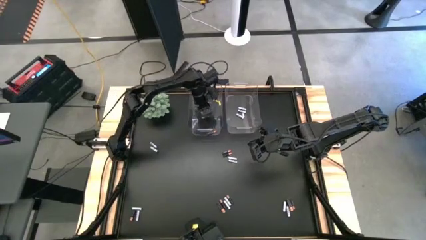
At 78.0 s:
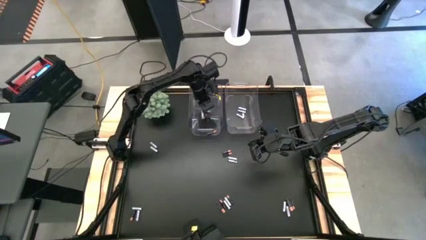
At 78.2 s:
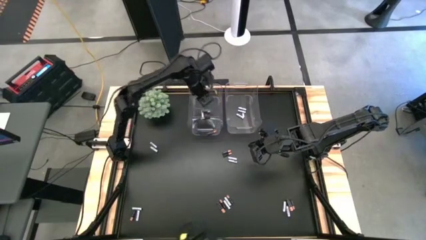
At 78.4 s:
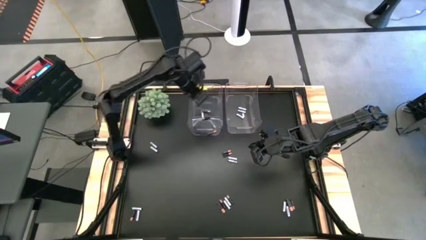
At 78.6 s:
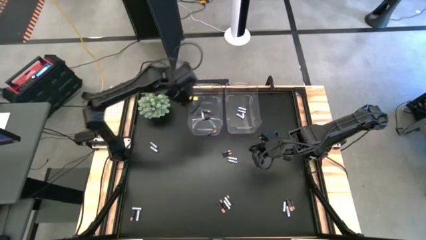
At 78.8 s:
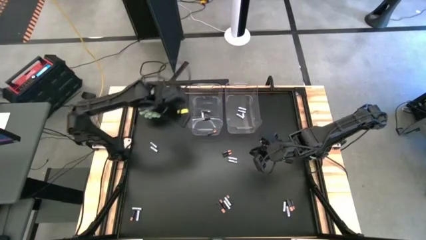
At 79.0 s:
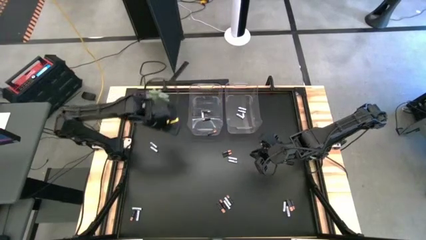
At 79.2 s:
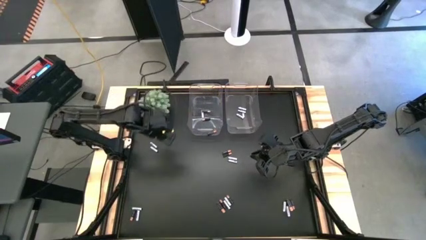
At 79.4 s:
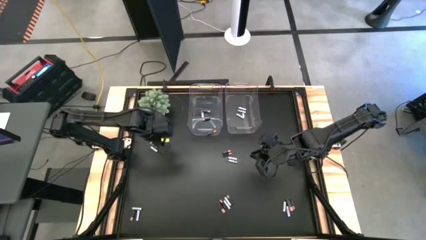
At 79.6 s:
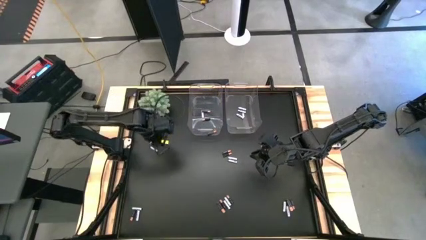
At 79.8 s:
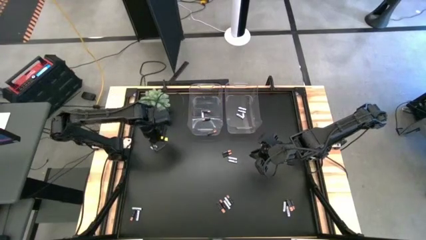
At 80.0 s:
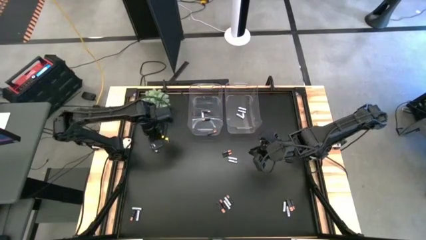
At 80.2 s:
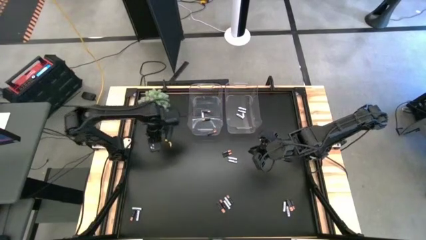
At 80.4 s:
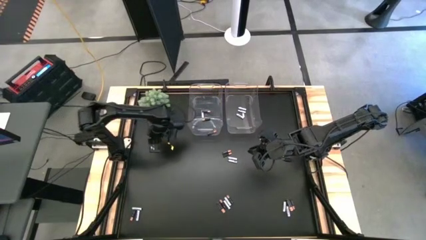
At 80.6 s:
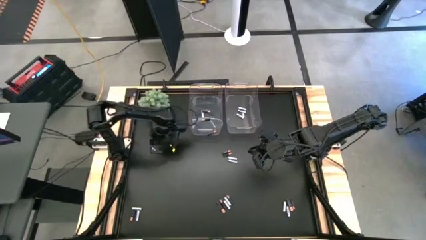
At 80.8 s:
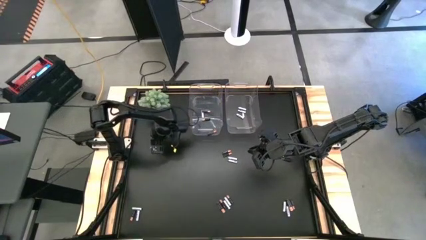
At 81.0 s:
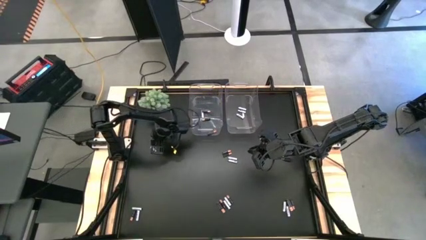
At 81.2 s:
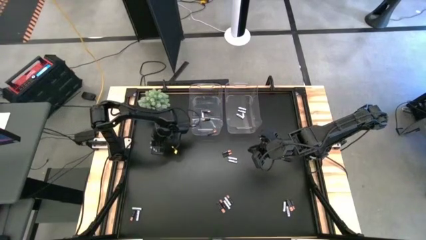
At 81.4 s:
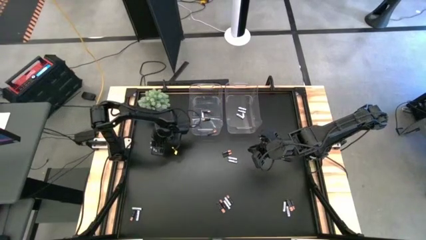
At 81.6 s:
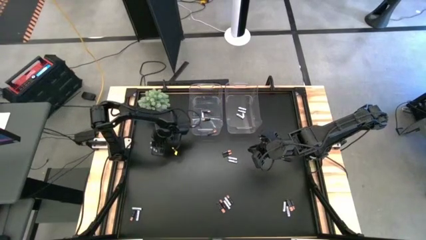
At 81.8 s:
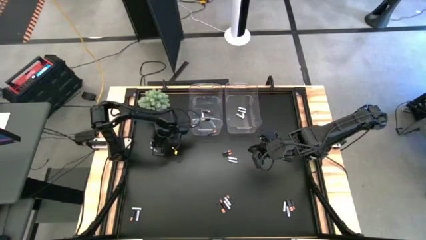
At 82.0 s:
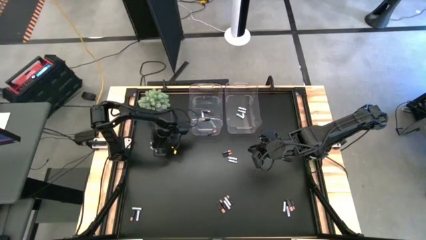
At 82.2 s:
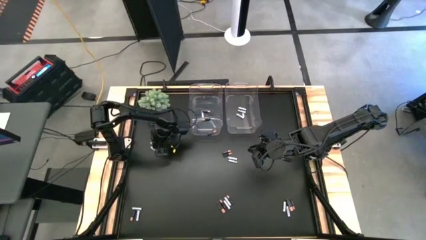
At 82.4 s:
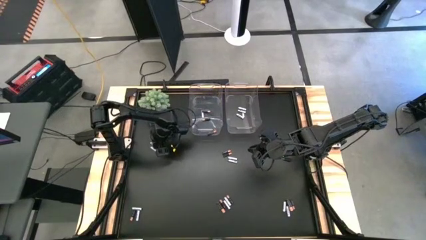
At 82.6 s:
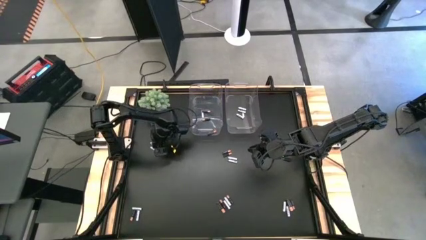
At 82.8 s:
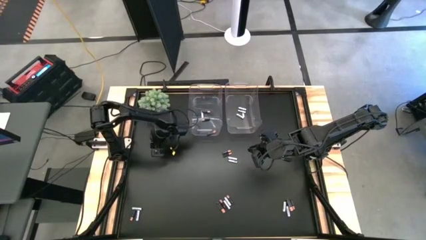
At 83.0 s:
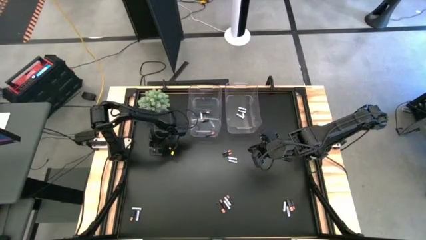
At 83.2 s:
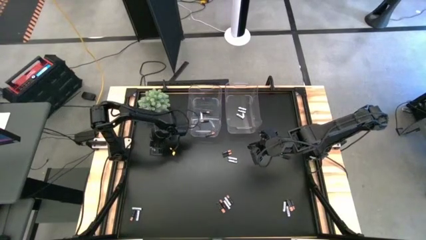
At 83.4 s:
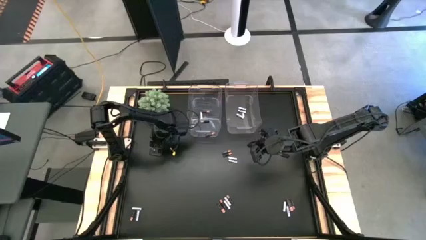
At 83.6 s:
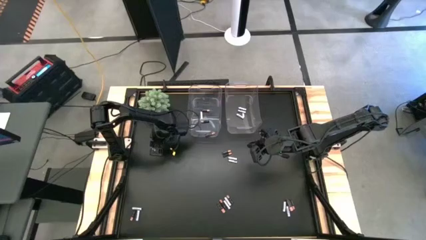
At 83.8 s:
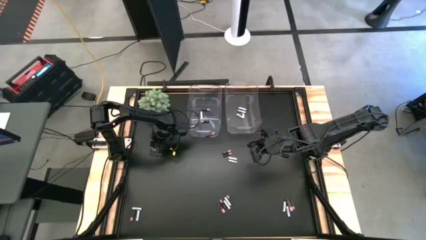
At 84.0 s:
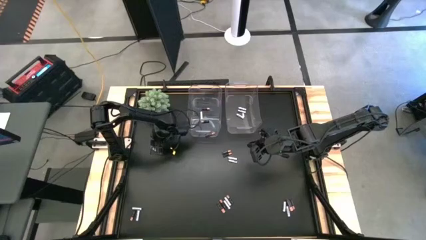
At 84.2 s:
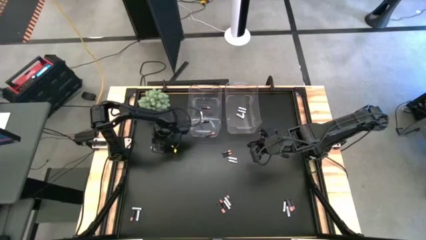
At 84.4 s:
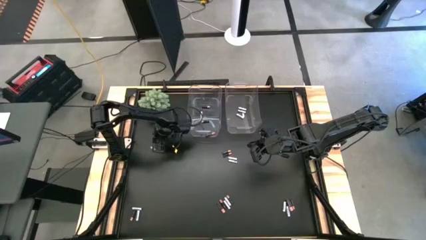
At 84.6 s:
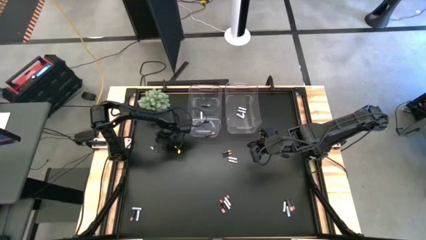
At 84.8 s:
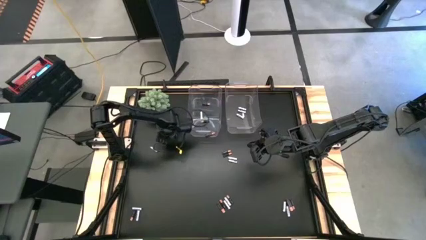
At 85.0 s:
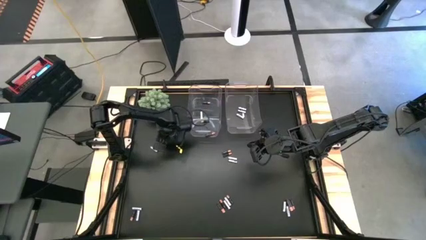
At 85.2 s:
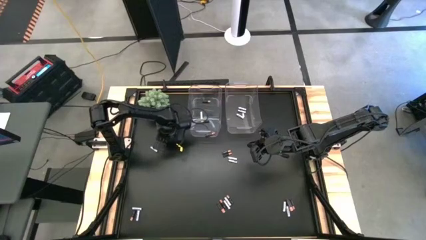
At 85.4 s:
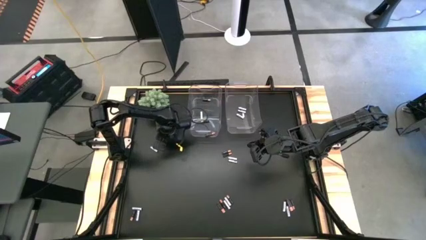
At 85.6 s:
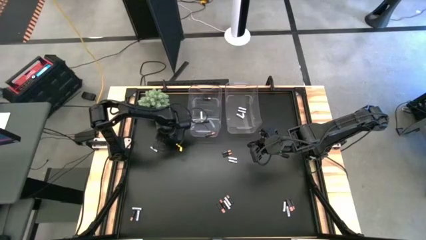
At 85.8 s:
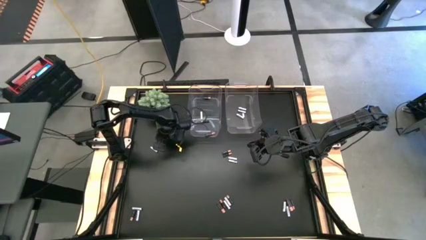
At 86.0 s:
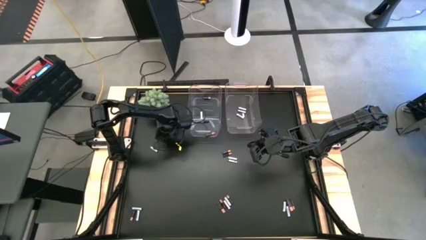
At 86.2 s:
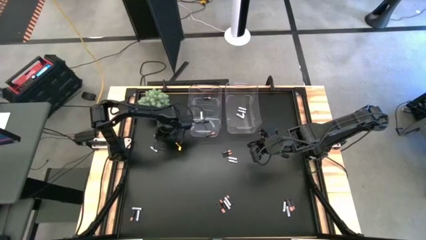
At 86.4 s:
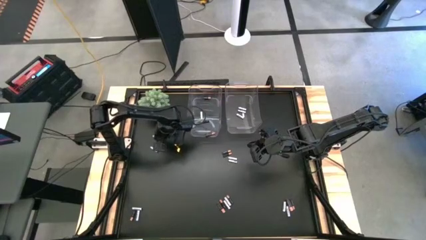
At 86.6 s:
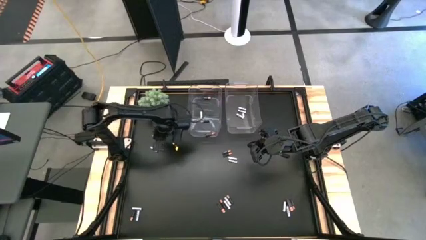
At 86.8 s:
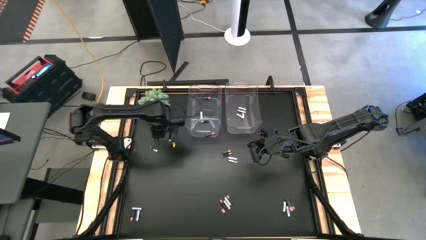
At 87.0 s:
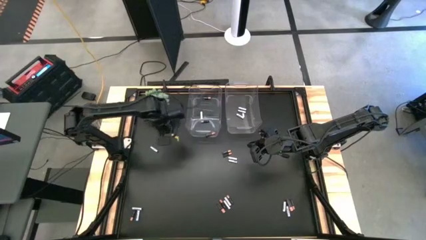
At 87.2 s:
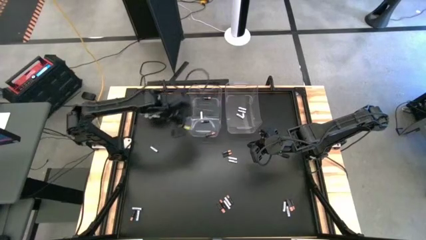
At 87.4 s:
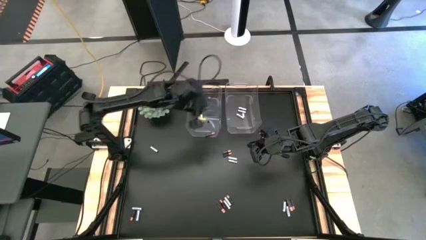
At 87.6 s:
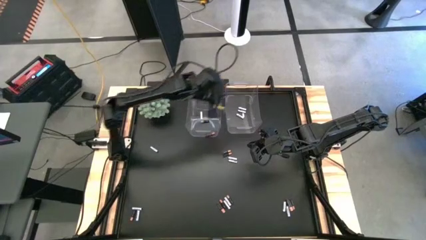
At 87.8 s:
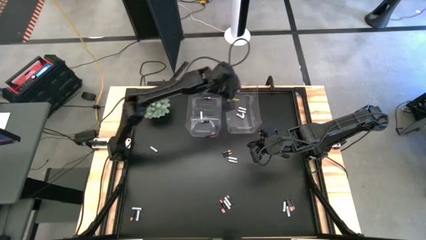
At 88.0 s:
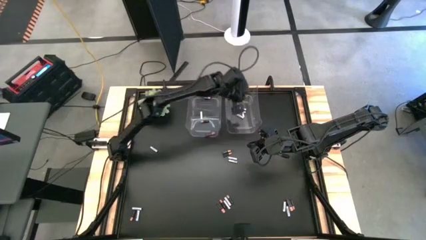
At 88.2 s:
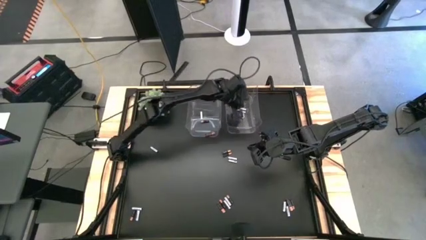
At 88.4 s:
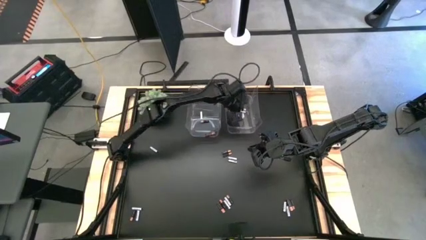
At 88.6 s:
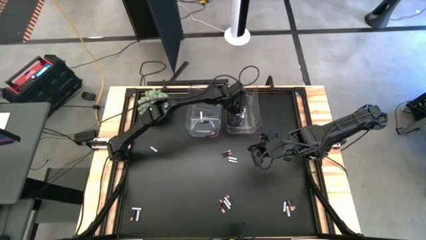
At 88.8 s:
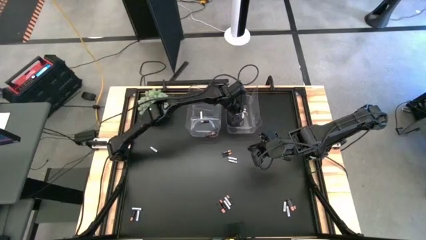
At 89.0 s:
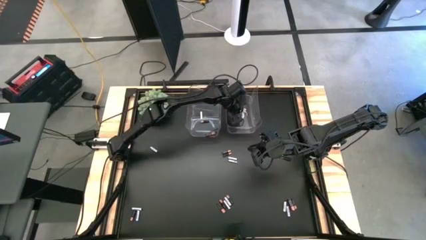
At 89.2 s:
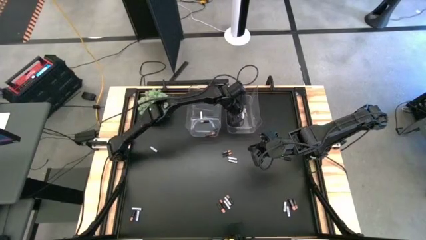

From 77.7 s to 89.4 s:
Task: Sort batteries
Put the white battery into the right transparent bin

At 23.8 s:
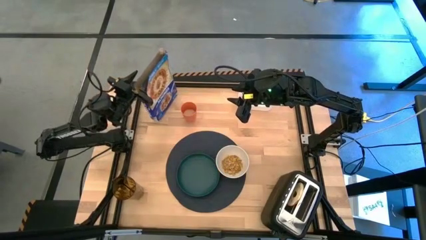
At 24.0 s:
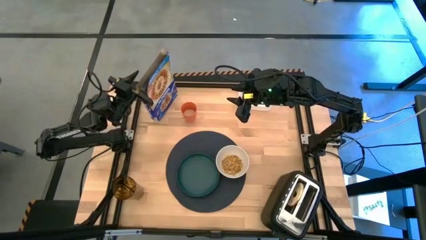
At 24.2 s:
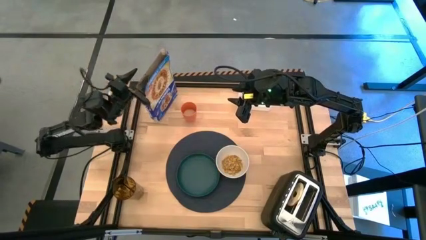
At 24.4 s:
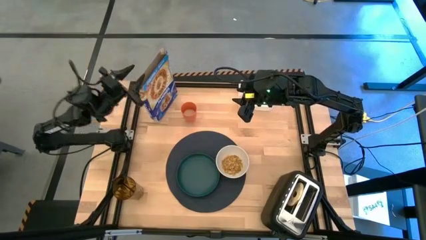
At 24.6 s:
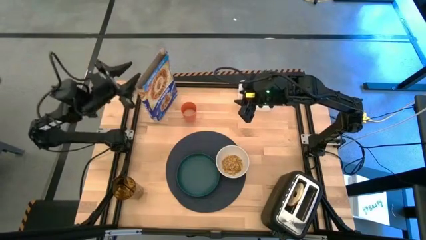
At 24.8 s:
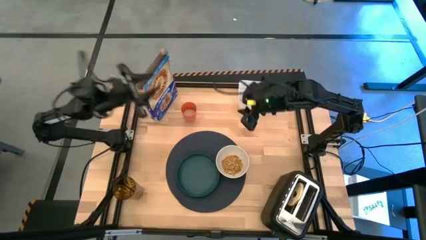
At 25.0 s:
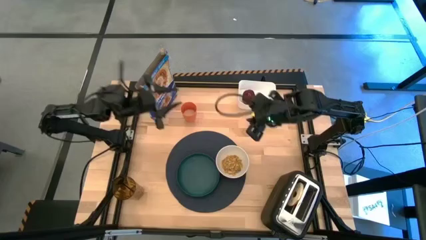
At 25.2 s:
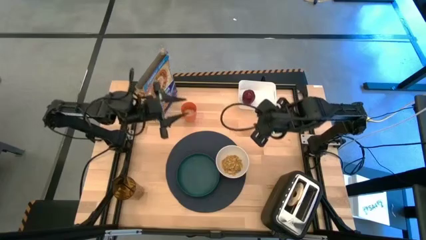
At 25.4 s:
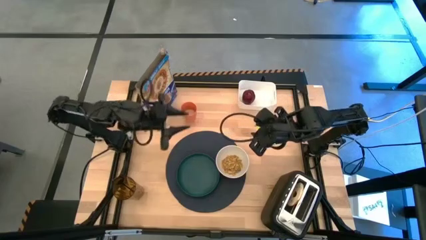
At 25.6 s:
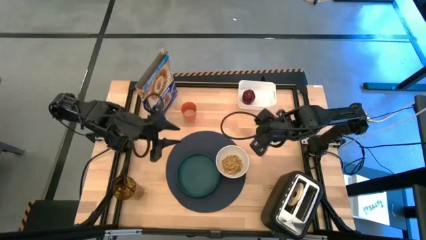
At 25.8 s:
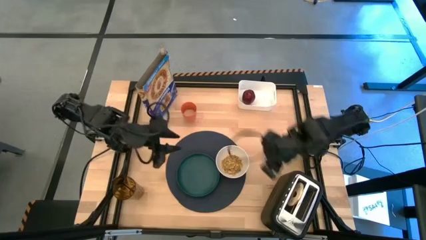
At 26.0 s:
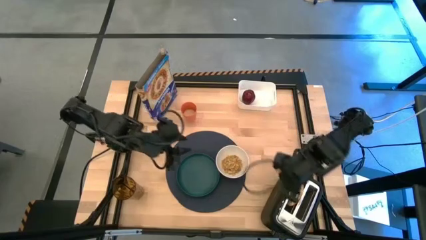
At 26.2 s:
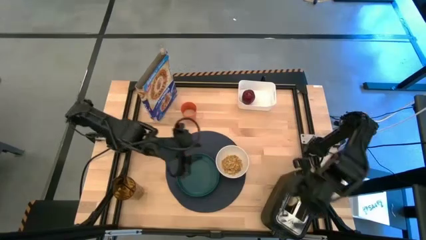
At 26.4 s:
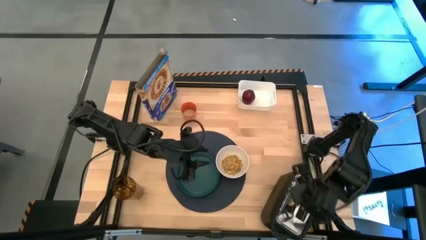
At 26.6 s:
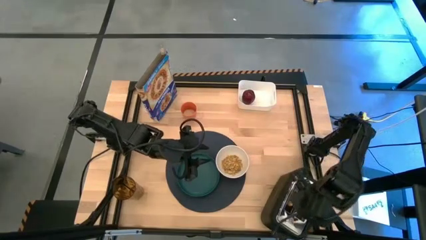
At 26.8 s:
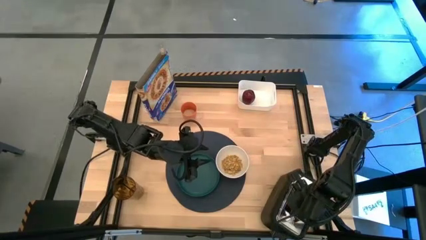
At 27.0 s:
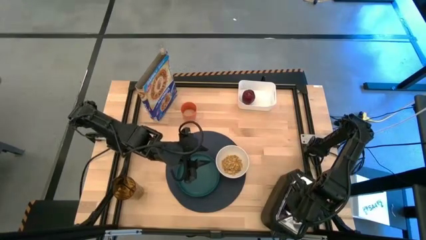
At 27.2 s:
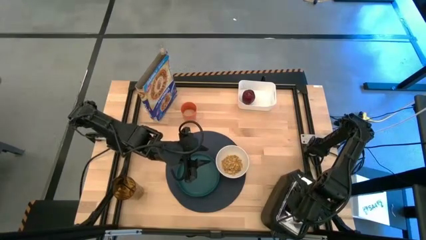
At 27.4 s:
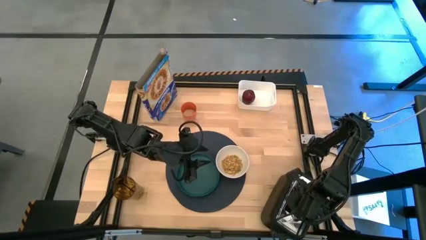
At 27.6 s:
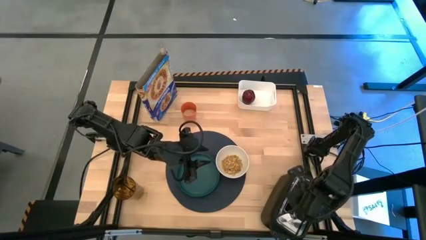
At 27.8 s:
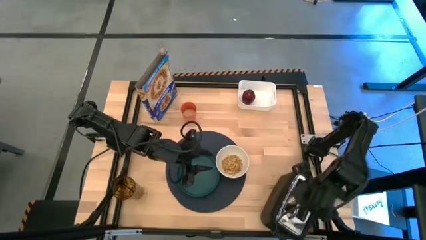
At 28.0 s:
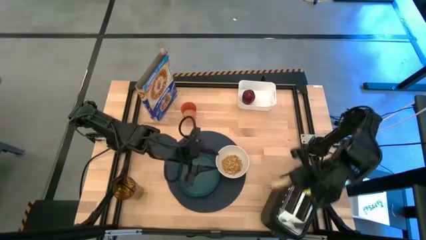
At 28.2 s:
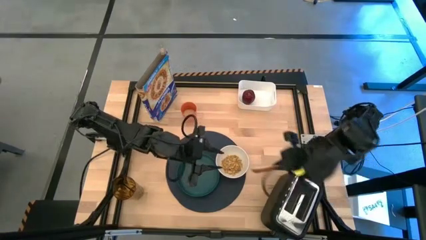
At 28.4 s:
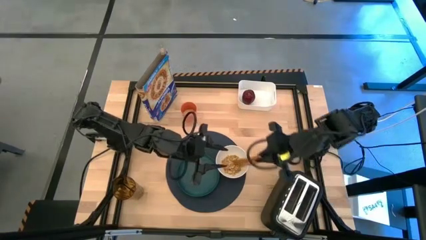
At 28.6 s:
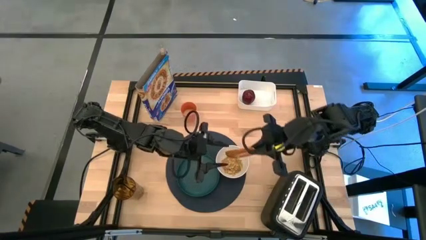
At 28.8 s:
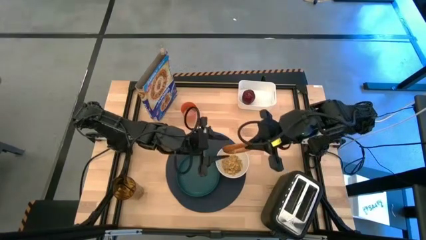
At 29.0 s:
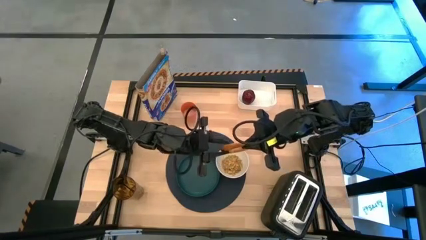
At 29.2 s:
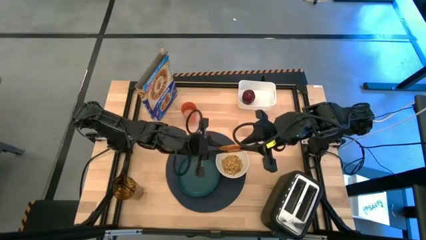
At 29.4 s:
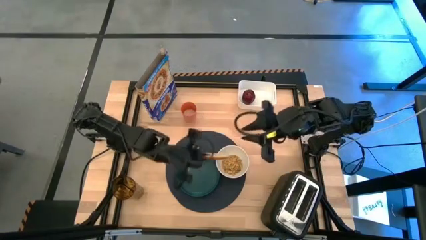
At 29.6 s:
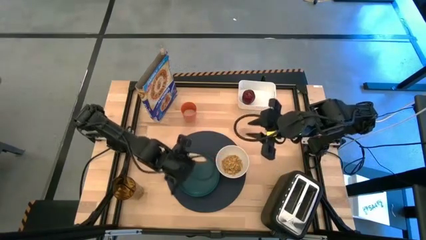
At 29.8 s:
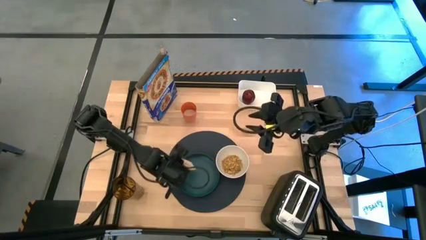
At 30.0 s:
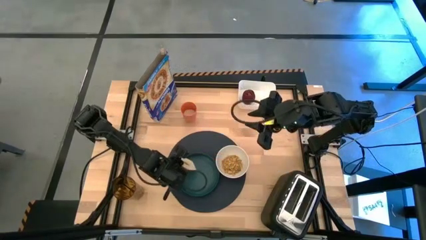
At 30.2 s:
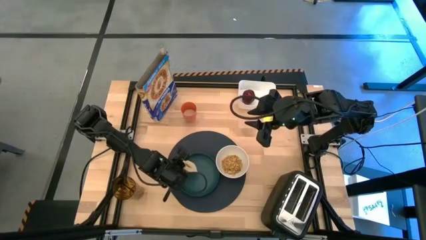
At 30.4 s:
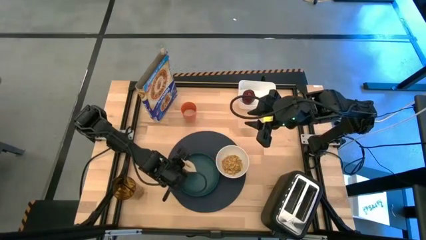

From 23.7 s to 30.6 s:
Task: Arrange a breakfast setting
Put the bagel on the plate
